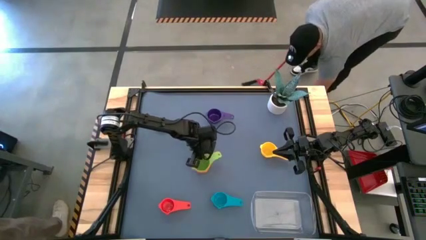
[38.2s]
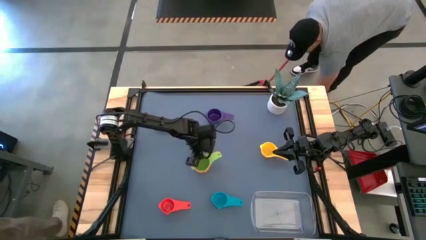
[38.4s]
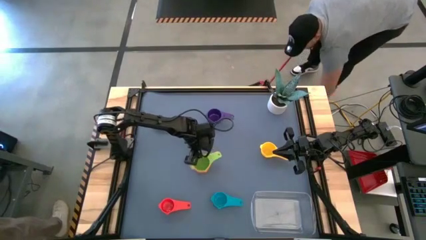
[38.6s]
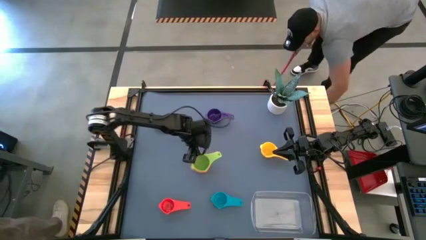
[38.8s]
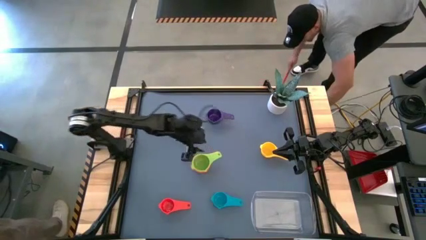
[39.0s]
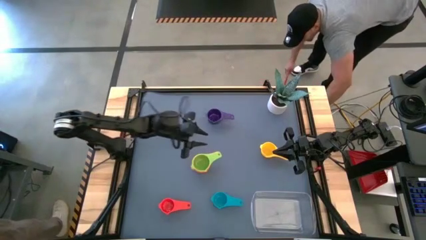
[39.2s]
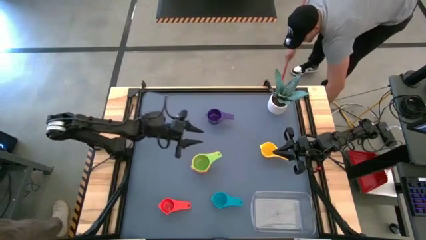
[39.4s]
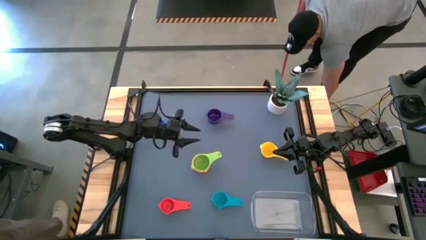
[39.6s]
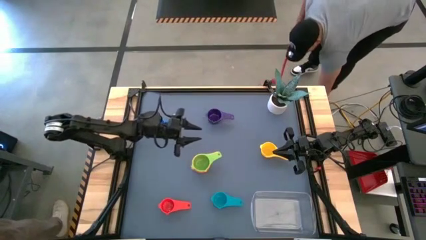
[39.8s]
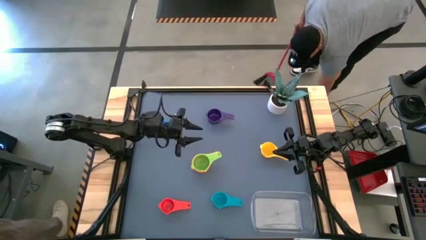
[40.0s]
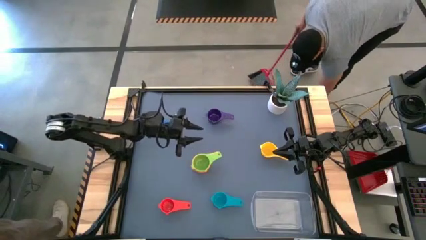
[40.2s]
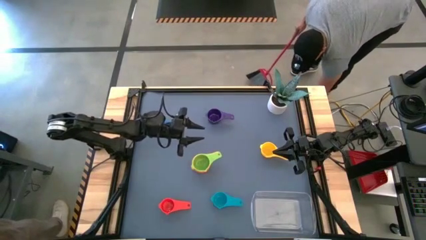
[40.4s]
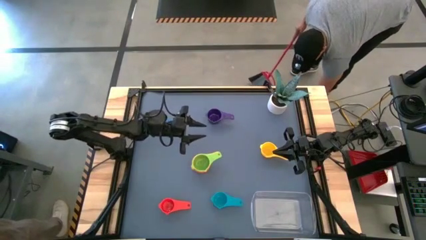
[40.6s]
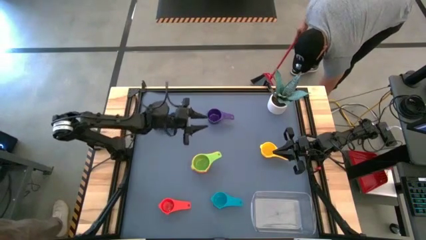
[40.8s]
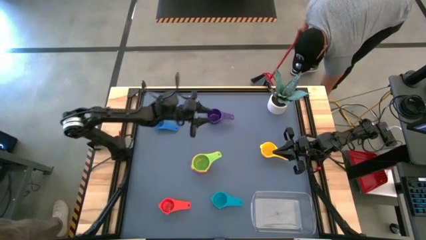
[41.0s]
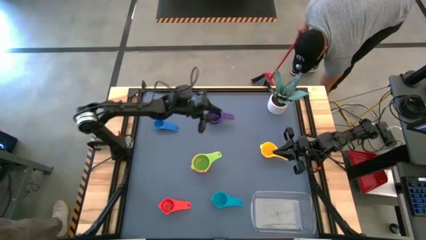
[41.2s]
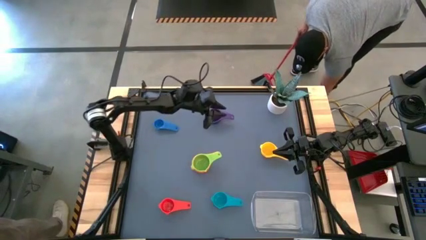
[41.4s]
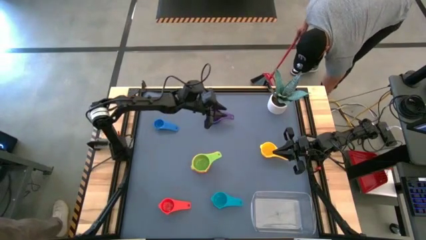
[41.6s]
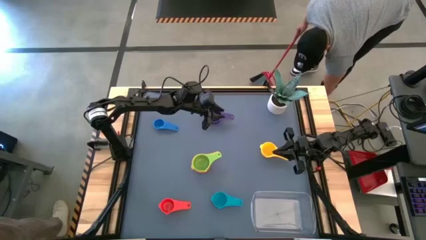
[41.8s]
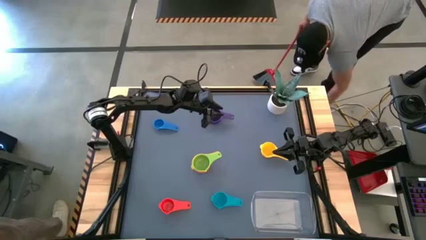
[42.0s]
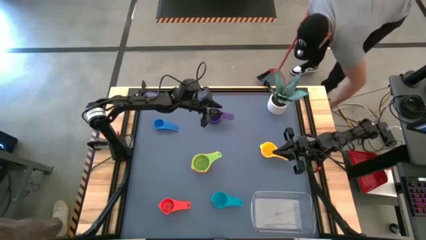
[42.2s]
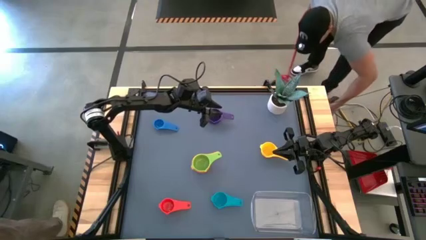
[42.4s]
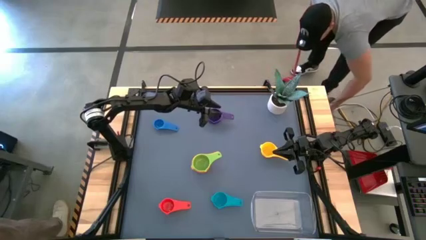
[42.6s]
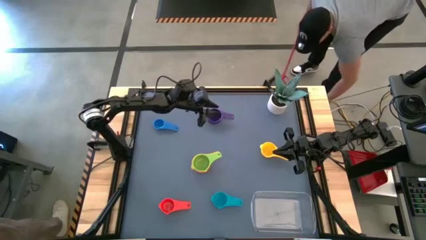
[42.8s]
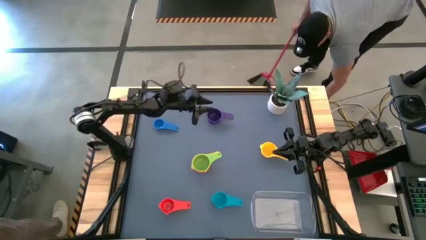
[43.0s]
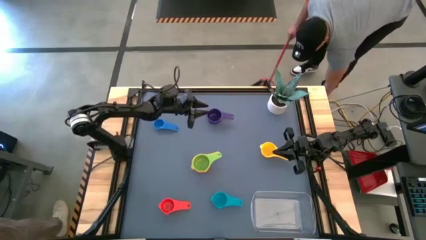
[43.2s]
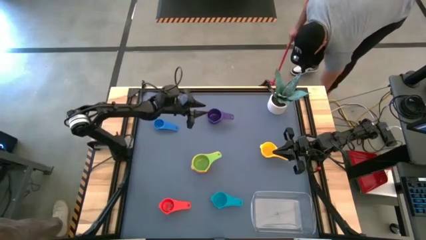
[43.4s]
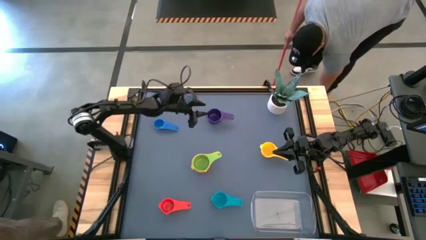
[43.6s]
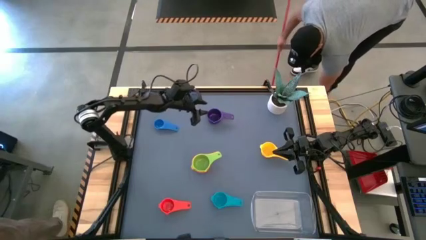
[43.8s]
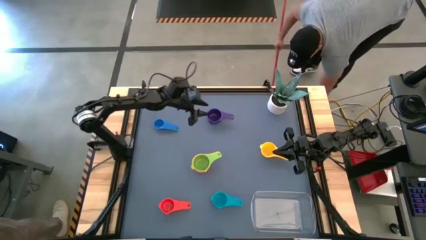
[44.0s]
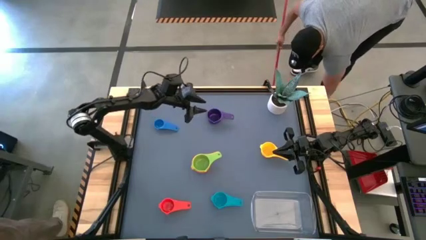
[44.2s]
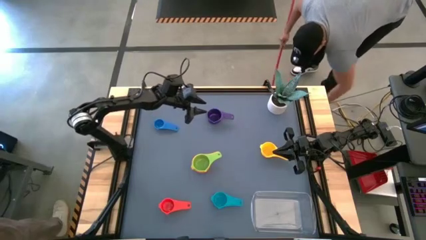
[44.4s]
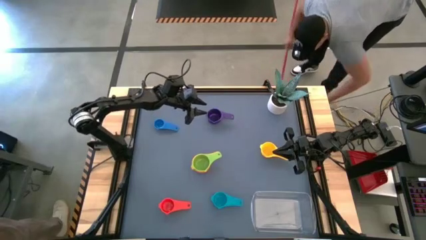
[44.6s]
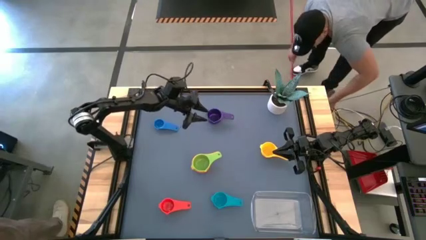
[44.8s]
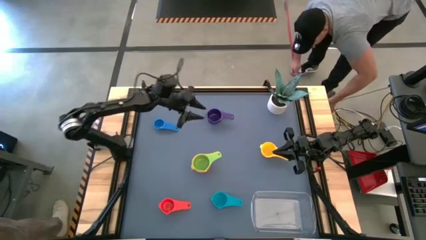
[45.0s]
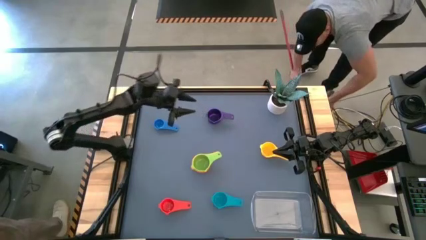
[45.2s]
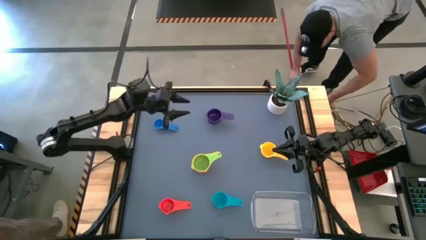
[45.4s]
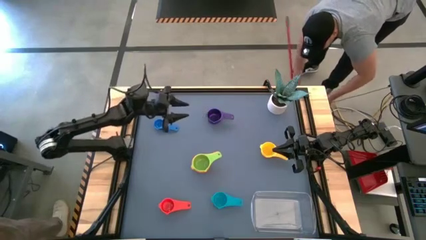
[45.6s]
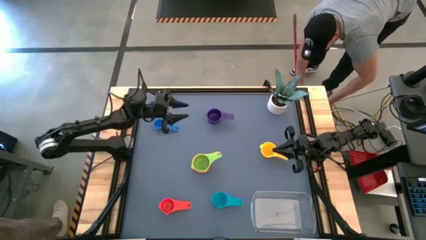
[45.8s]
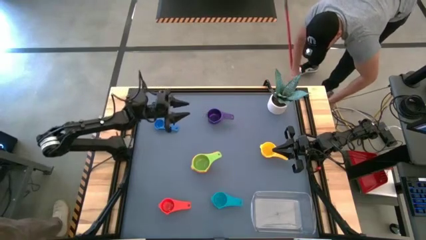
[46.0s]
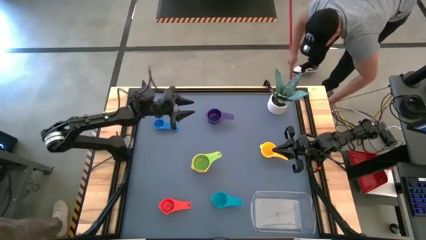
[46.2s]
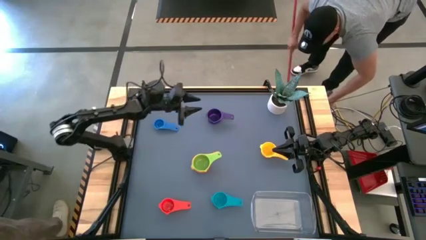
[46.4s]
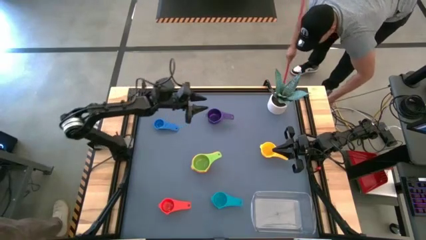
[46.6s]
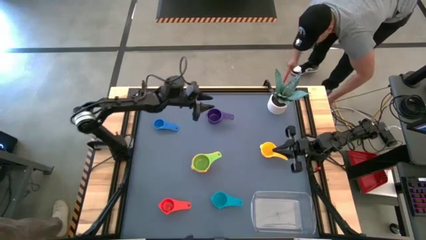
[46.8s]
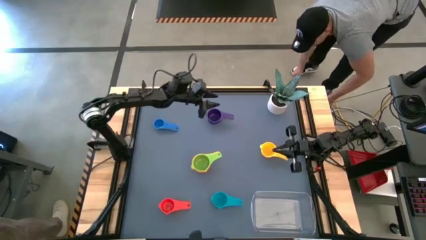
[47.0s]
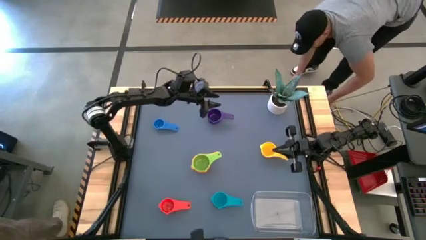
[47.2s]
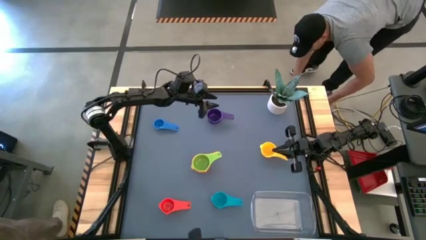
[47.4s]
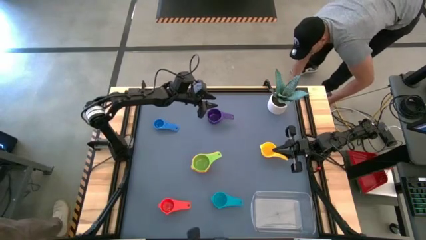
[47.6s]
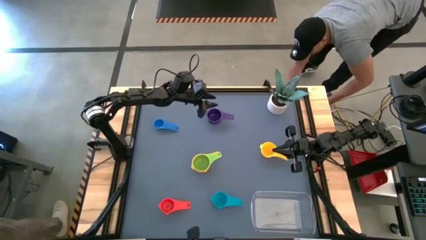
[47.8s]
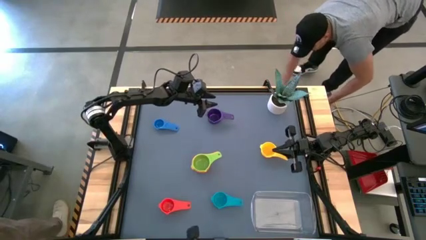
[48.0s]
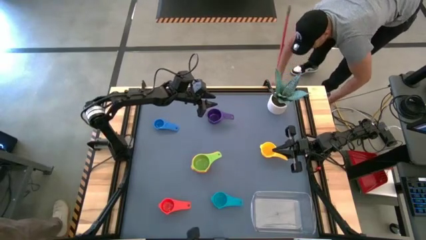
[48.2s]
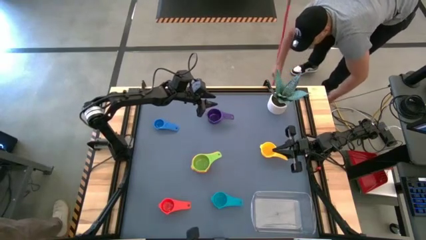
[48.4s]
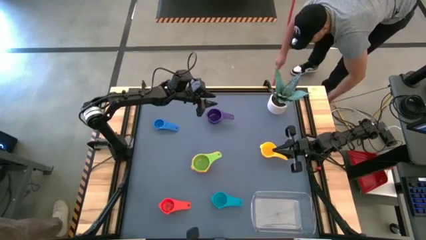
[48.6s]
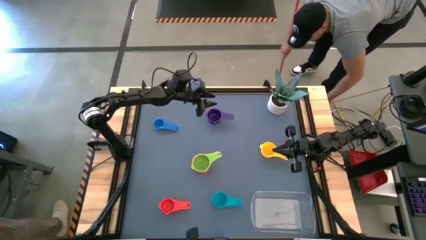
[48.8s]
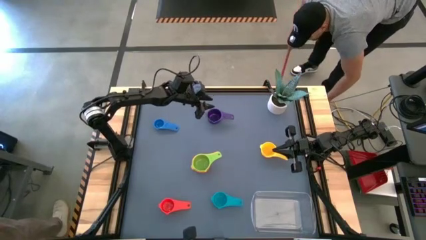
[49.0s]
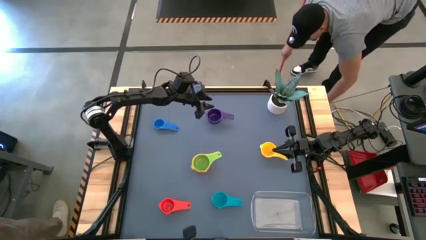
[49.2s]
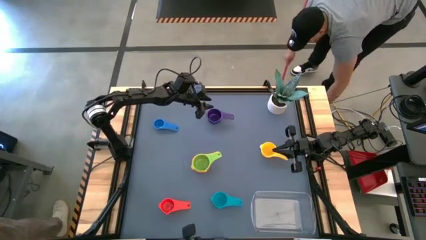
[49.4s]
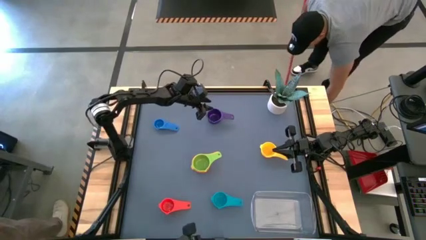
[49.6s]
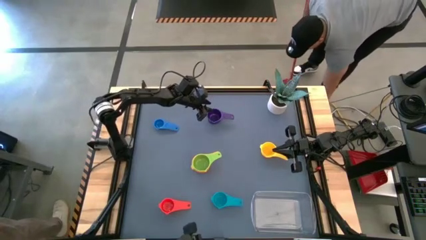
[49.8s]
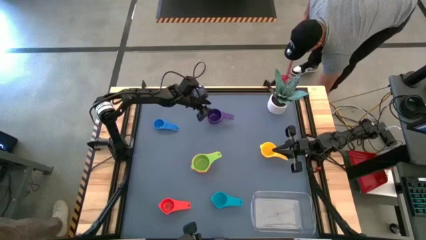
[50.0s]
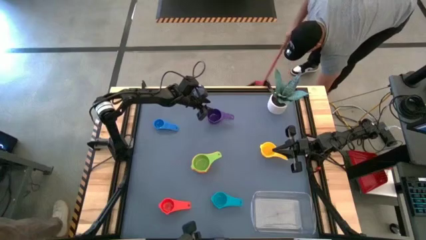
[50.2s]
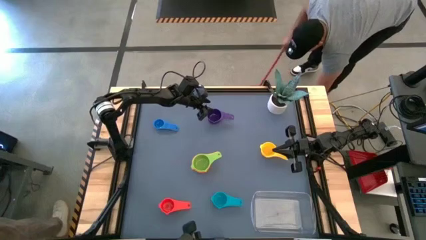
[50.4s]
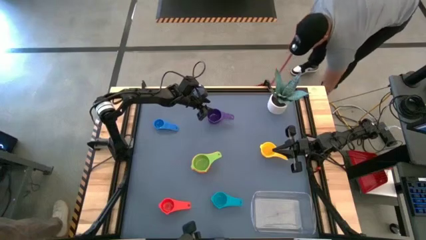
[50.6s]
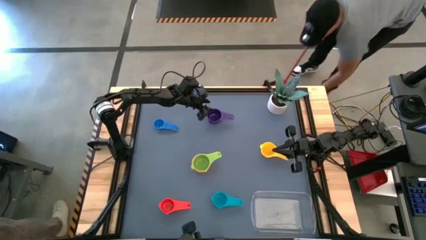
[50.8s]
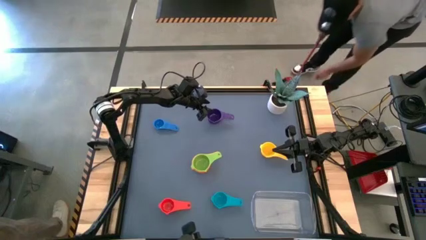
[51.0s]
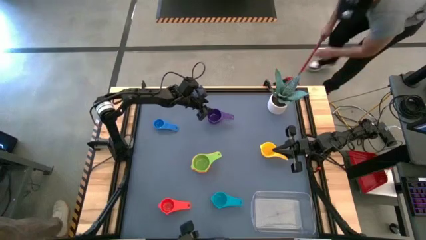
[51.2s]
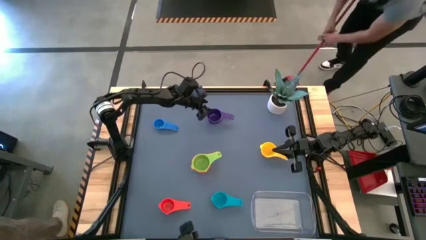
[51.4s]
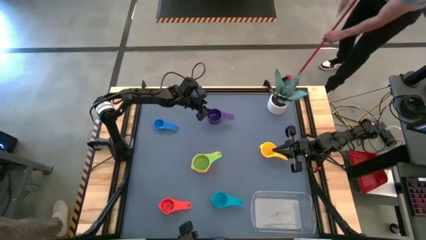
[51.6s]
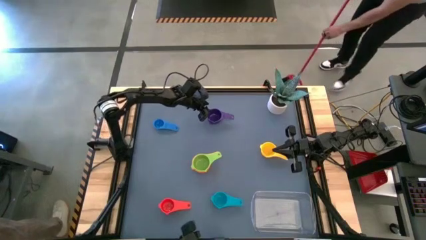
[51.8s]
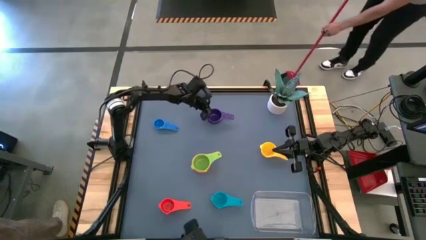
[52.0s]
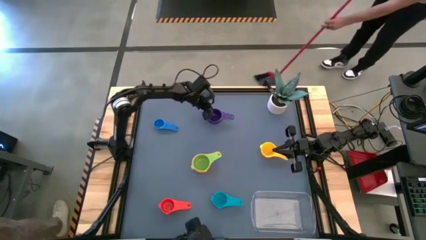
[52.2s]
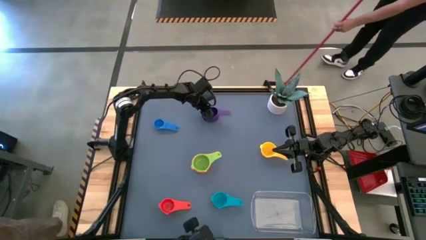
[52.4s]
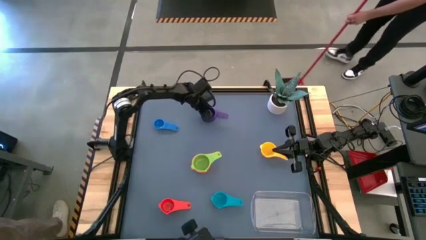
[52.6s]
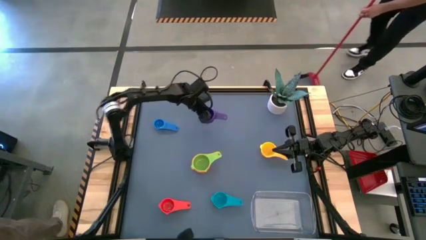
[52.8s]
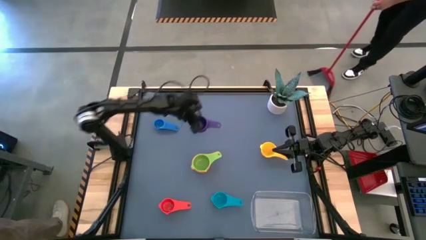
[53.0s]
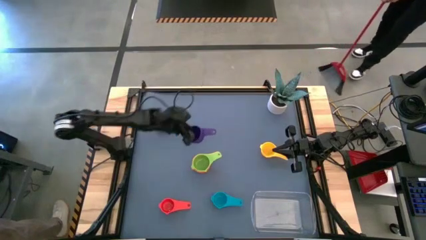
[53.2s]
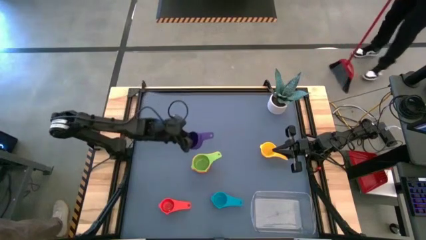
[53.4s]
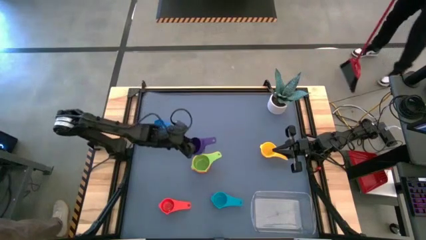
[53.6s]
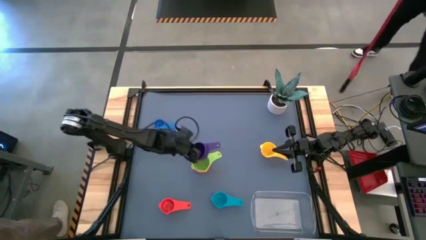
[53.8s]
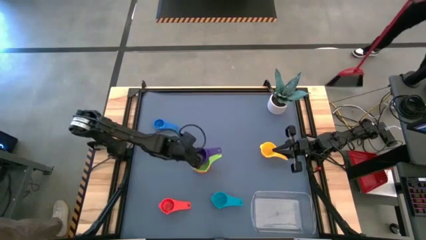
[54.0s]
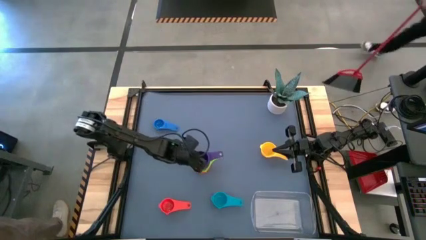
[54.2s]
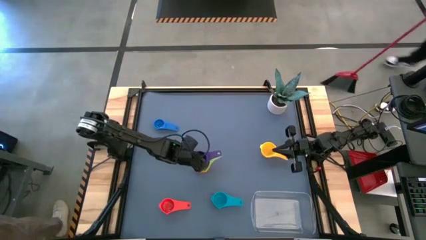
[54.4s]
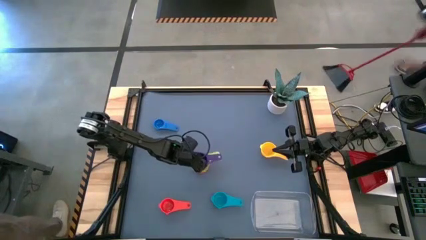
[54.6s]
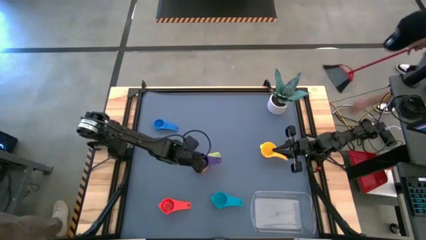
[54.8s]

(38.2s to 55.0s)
Task: Nest measuring cups in basket
Stack the purple measuring cup on top of the green measuring cup
